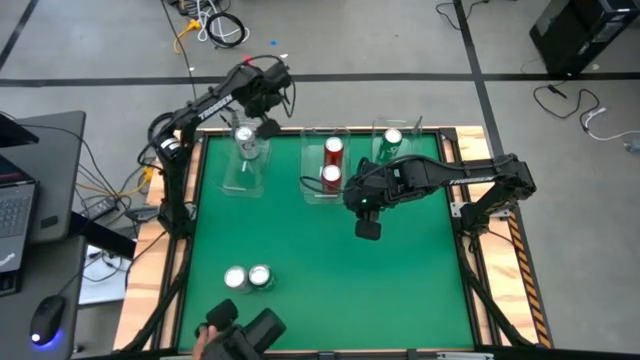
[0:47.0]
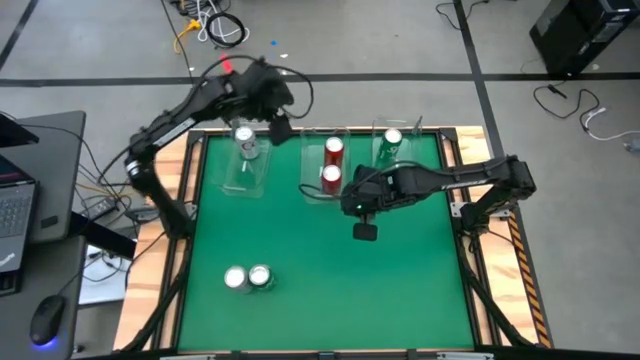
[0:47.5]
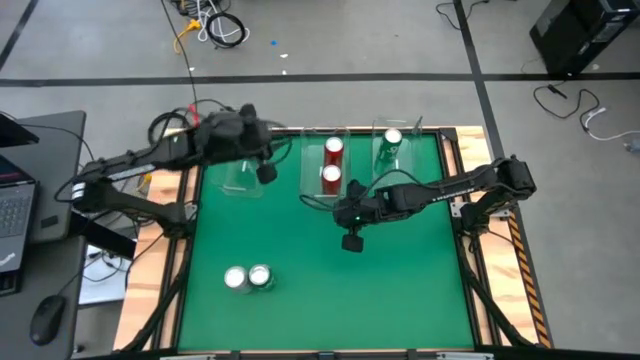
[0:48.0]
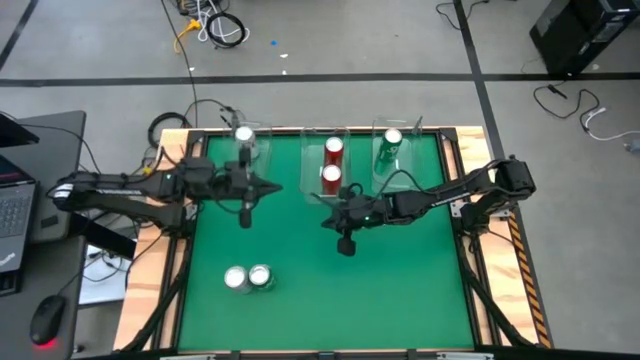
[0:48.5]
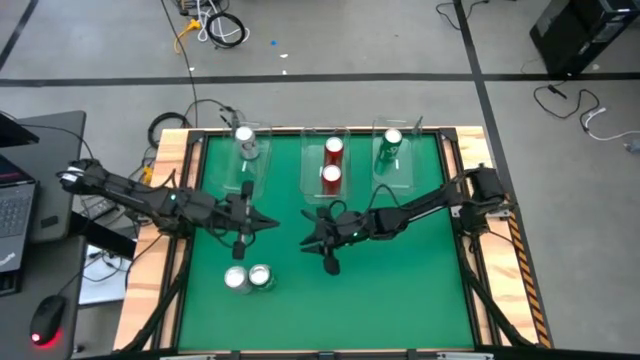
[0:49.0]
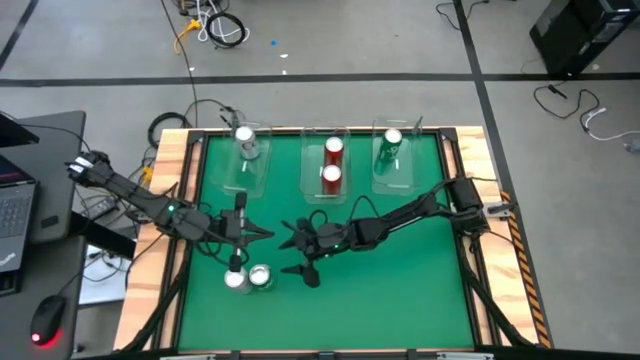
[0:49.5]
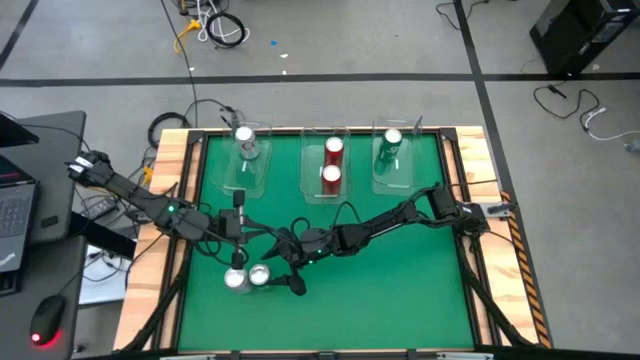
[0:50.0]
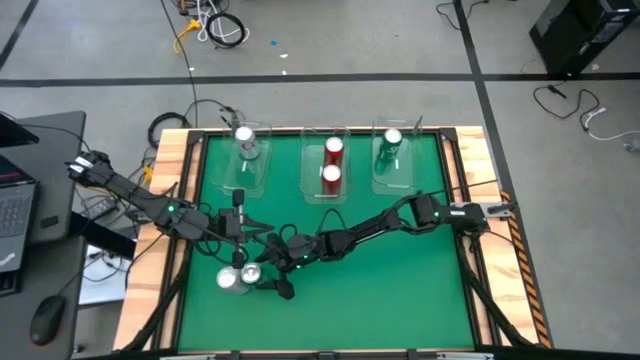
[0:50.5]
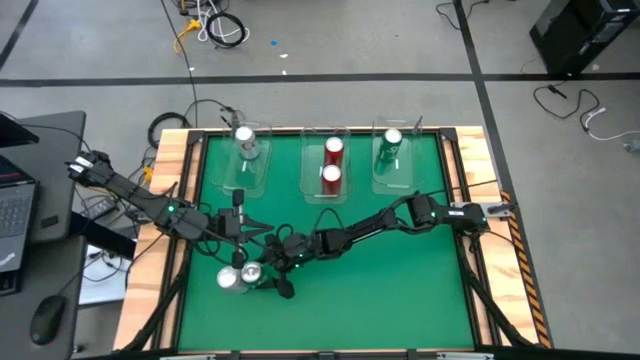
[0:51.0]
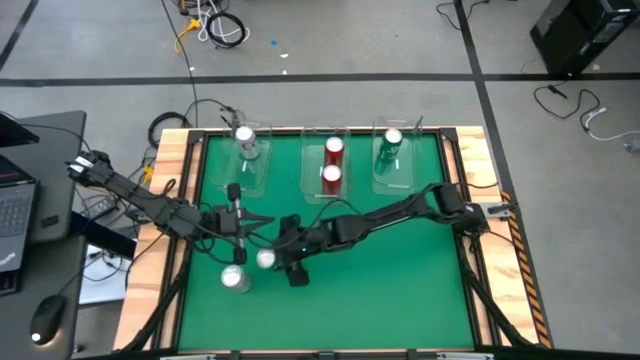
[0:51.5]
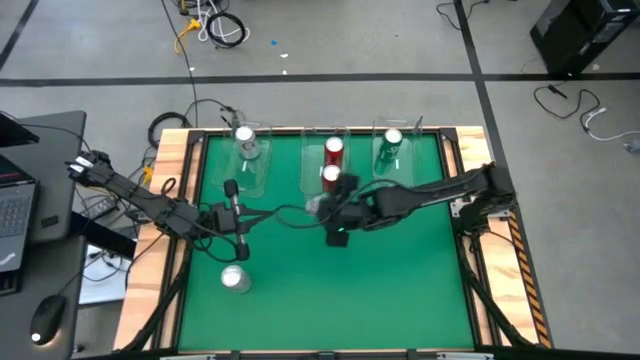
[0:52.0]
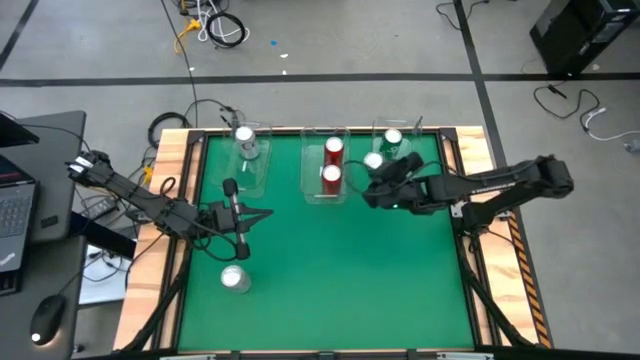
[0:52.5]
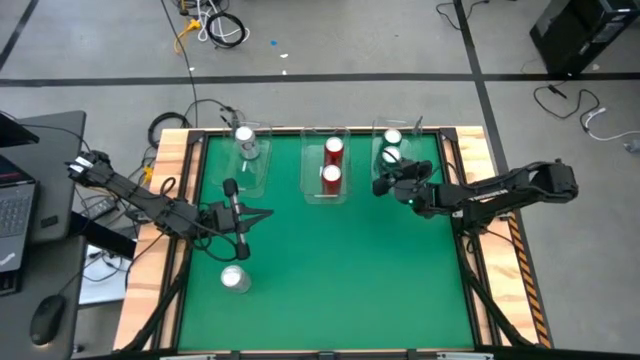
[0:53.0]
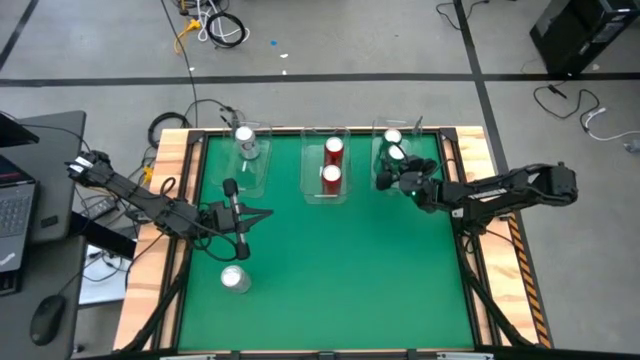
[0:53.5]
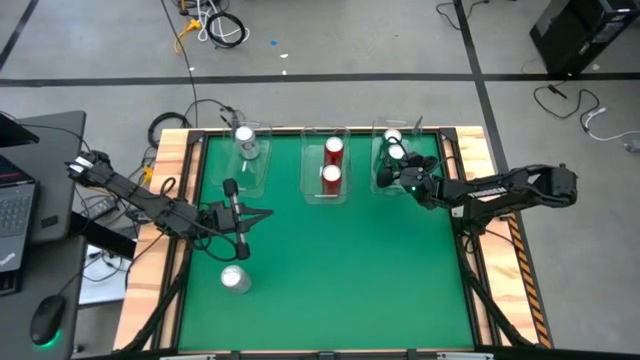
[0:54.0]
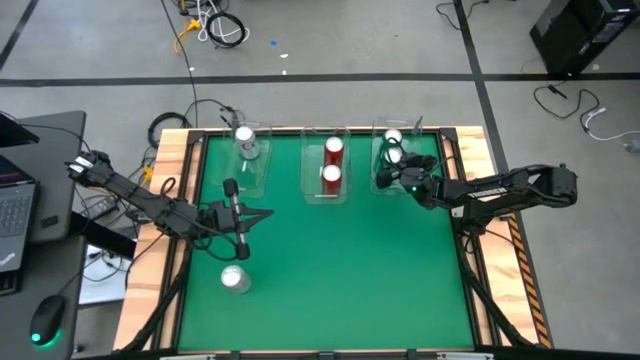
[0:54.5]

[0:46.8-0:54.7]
Task: Sort soda cans
Put the green soda can into the right transparent bin

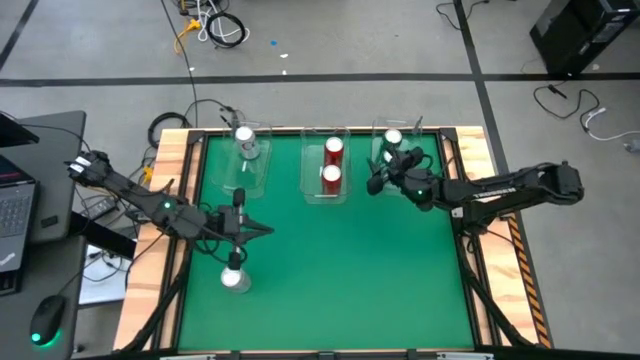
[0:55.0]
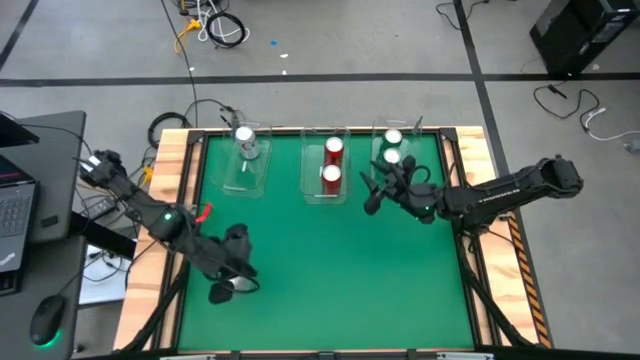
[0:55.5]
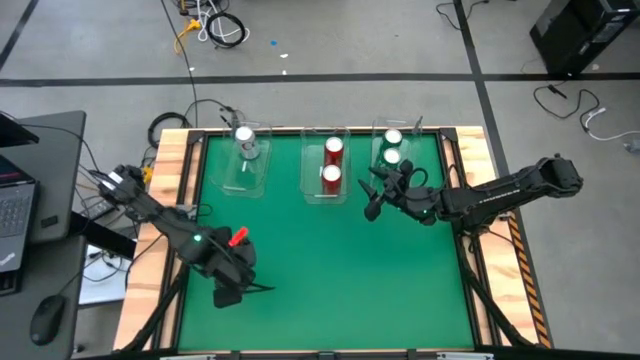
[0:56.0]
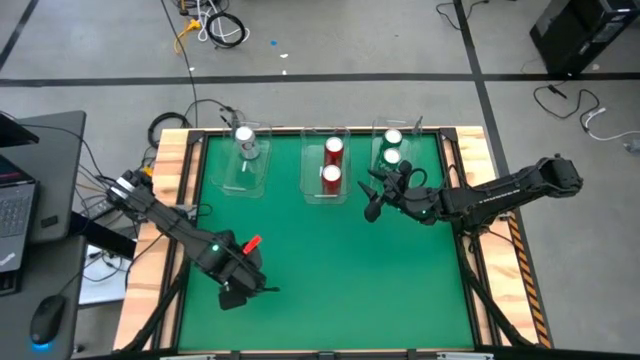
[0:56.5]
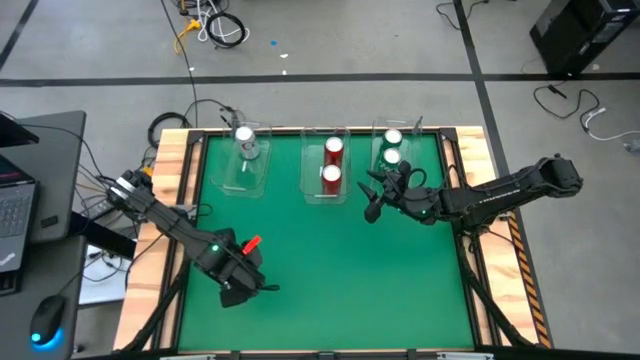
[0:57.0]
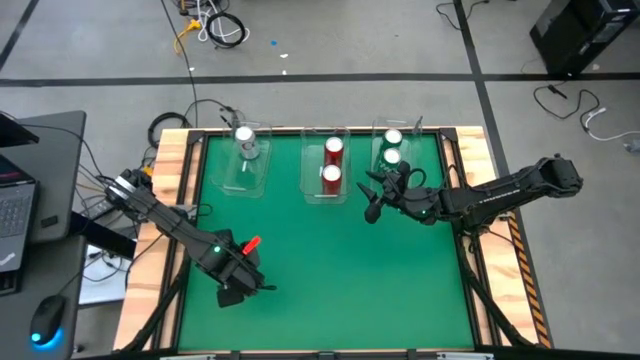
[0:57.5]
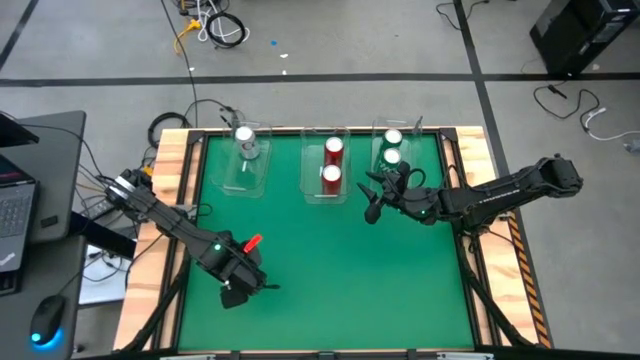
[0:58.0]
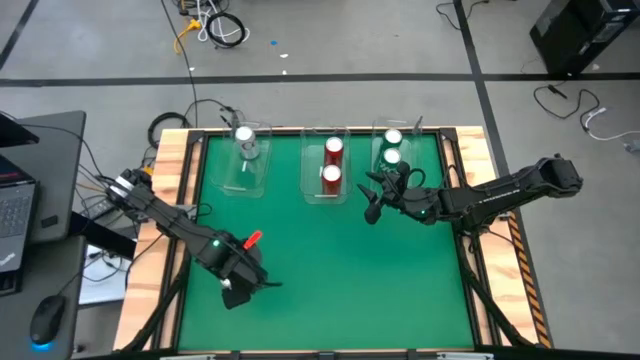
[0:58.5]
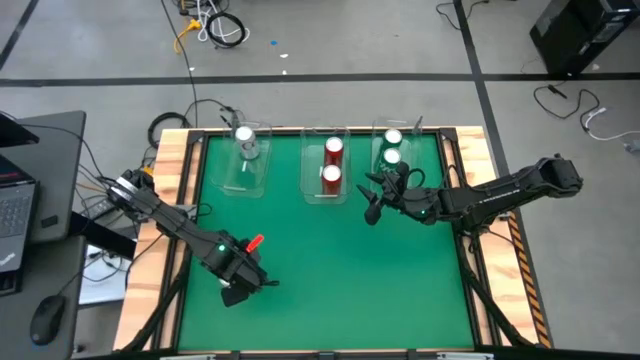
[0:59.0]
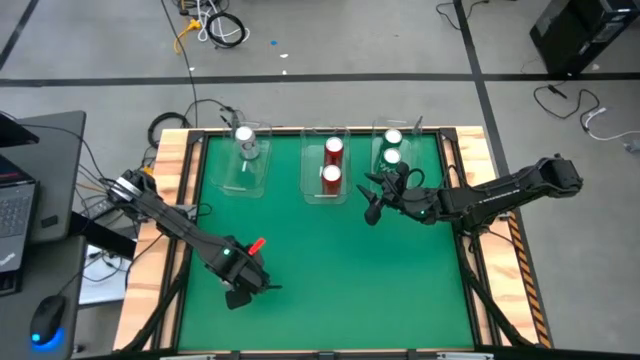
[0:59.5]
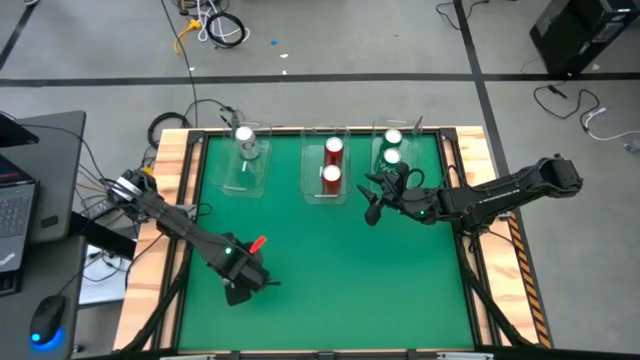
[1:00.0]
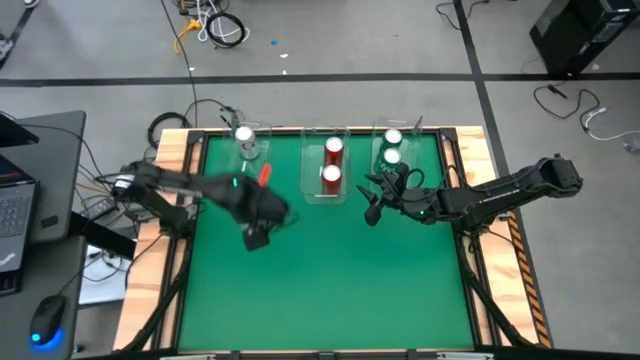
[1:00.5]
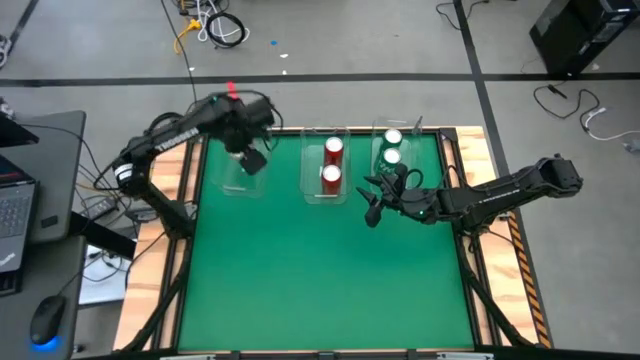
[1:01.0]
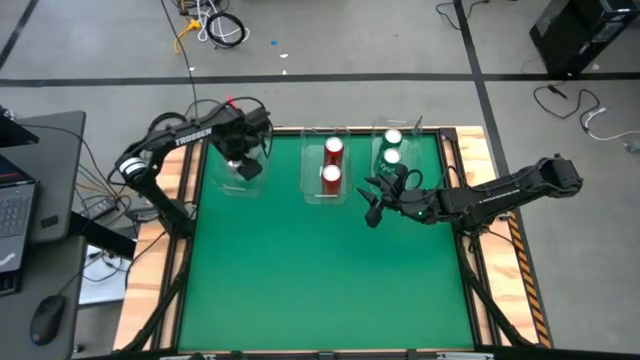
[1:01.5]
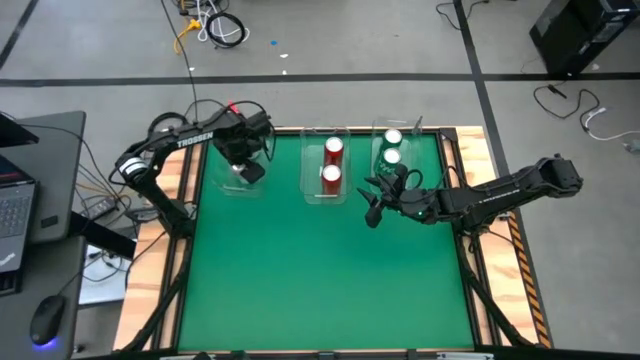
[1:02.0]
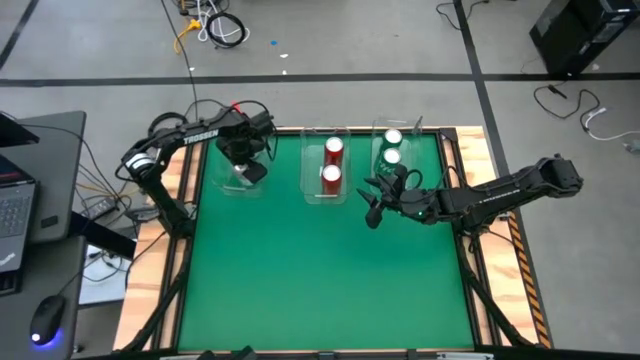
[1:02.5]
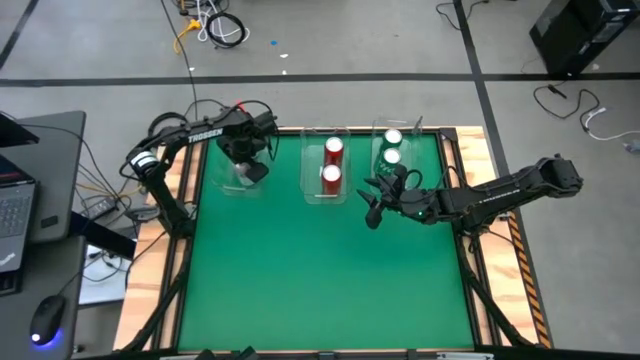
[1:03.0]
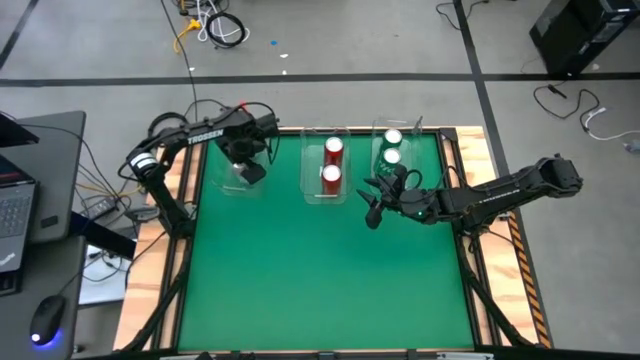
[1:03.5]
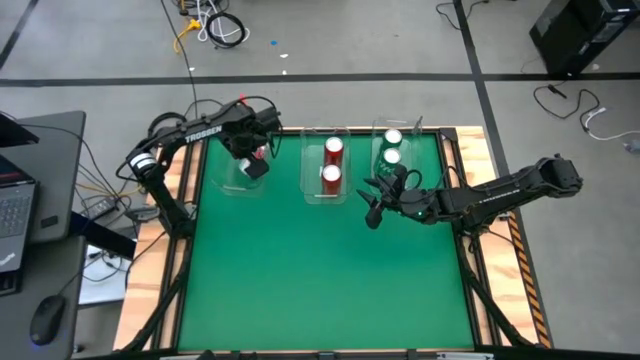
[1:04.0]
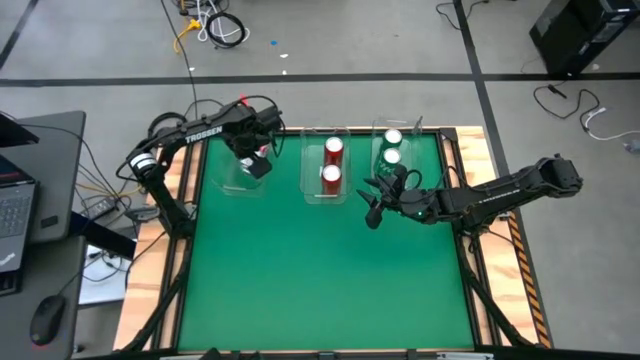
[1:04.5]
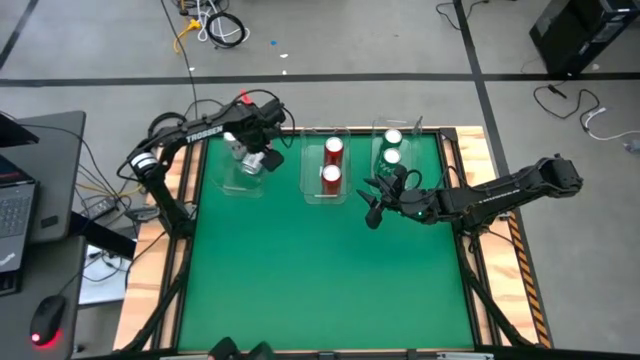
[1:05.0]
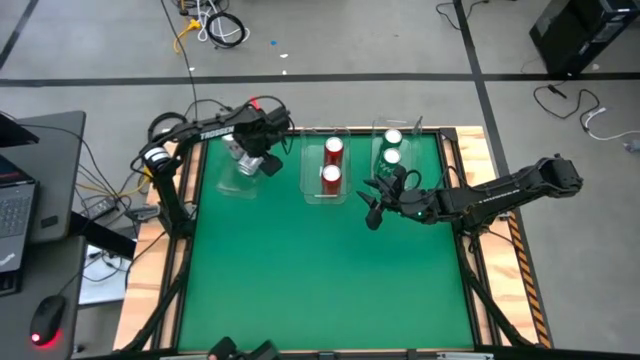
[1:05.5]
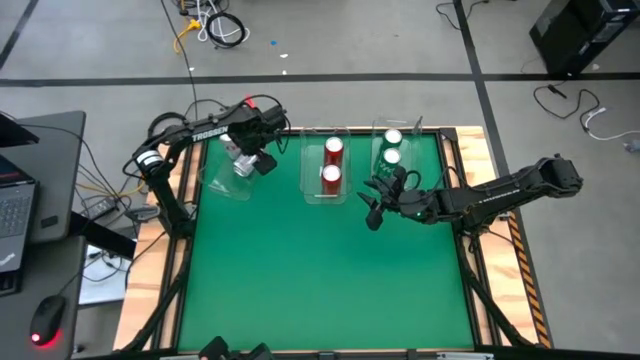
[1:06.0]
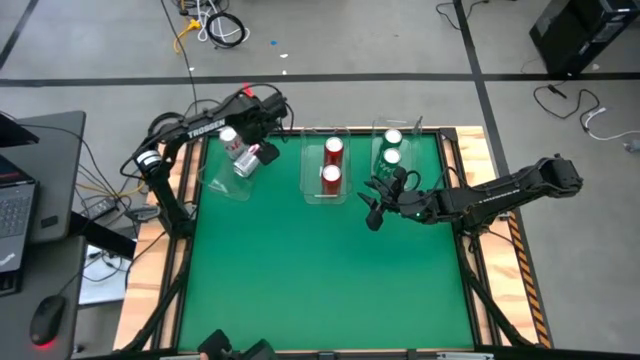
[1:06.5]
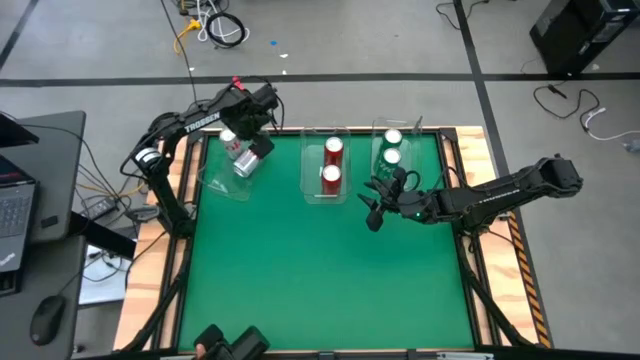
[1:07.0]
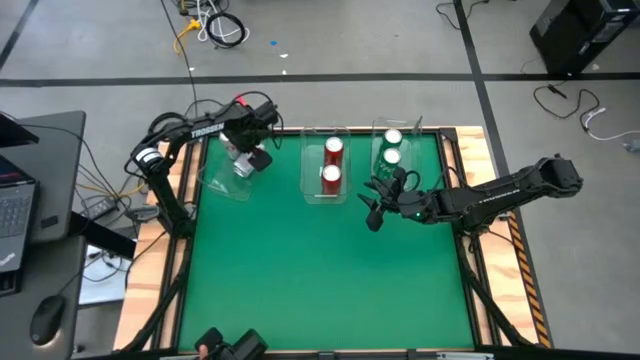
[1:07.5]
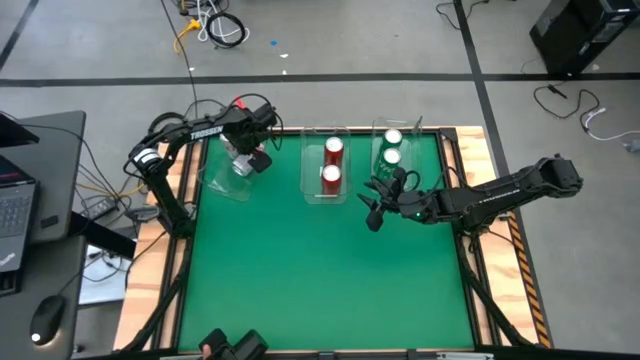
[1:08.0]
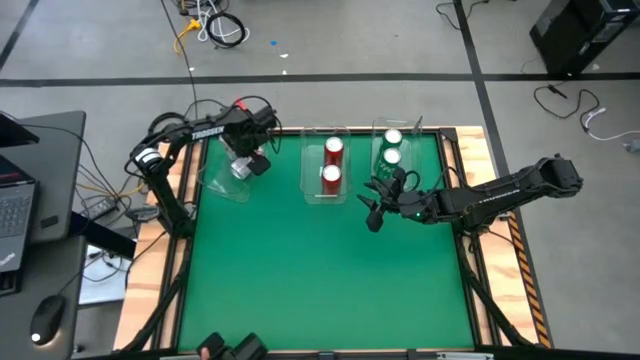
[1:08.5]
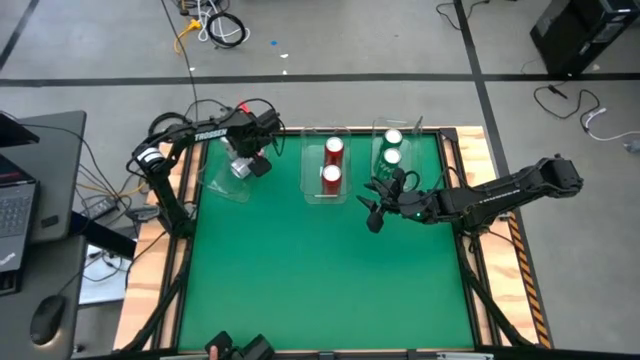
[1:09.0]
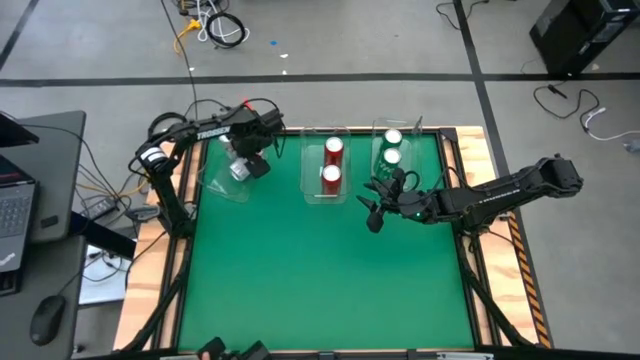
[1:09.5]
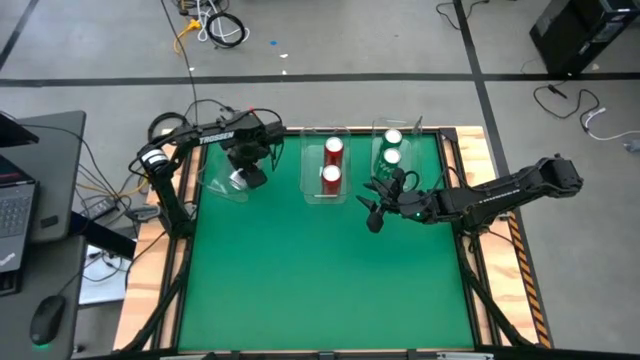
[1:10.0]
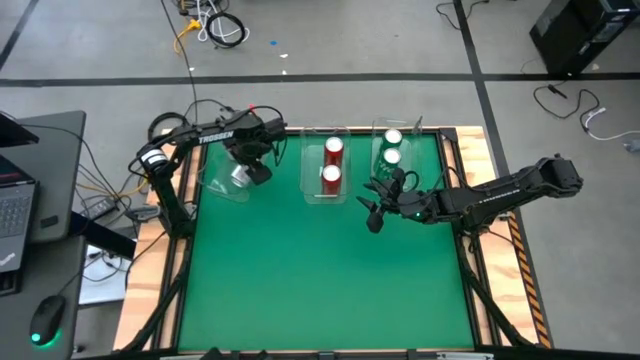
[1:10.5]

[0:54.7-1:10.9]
Put the red-silver soda can into the left transparent bin
